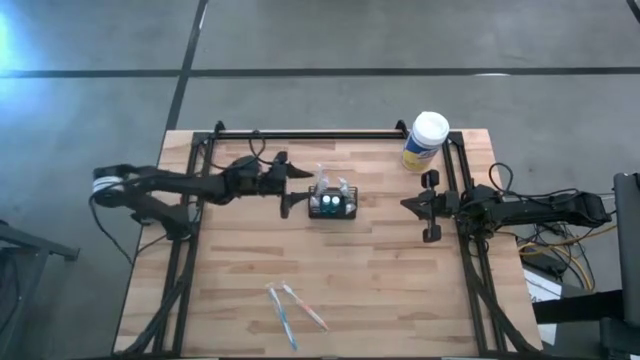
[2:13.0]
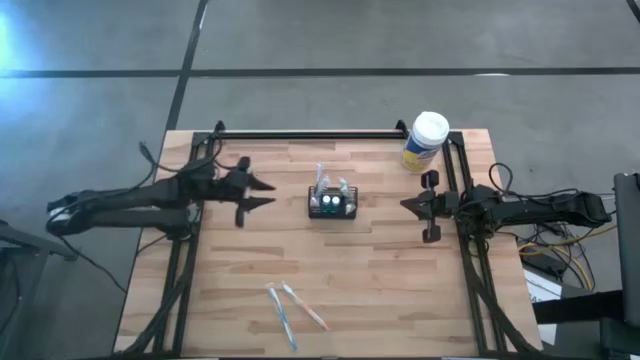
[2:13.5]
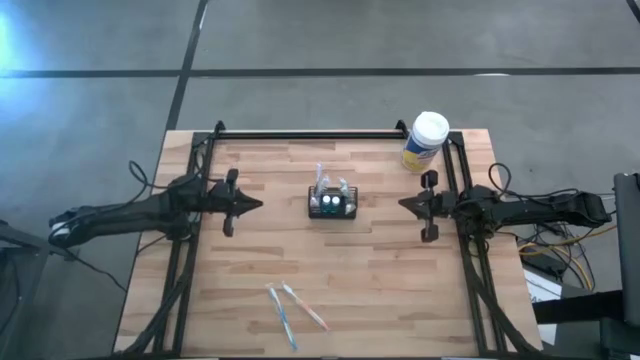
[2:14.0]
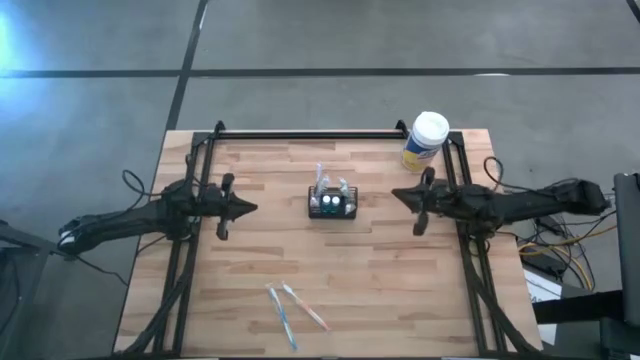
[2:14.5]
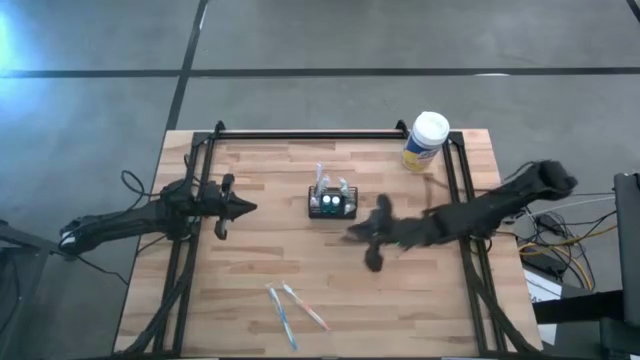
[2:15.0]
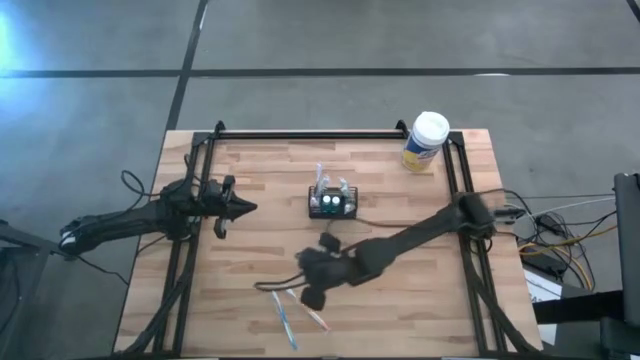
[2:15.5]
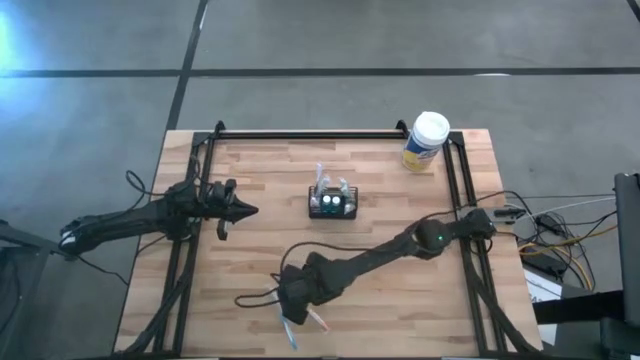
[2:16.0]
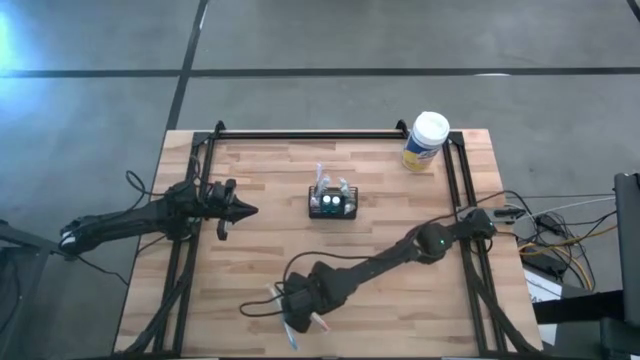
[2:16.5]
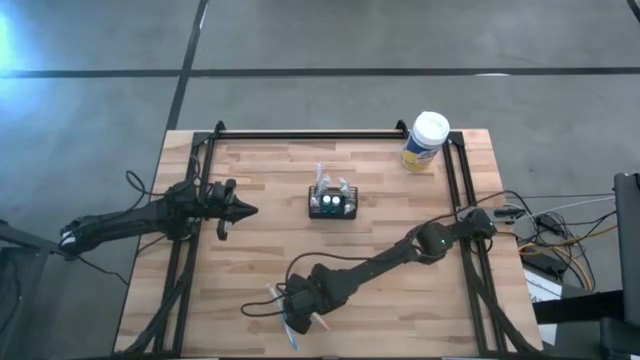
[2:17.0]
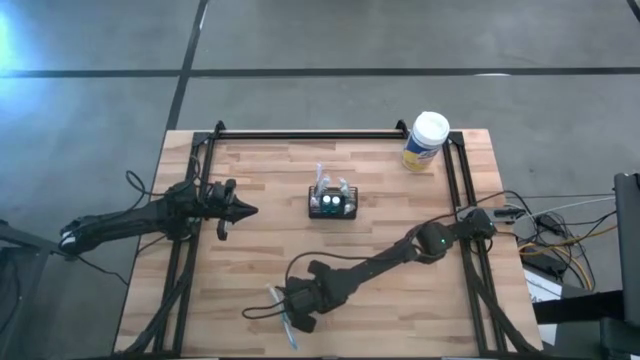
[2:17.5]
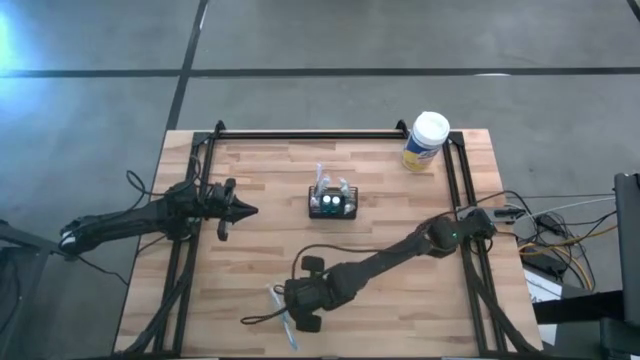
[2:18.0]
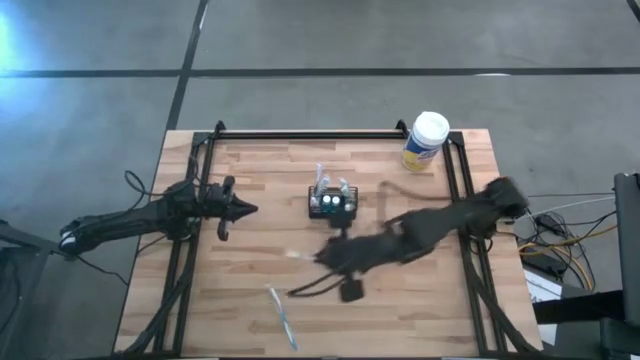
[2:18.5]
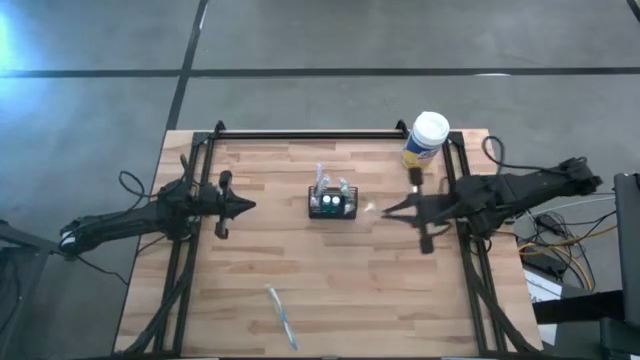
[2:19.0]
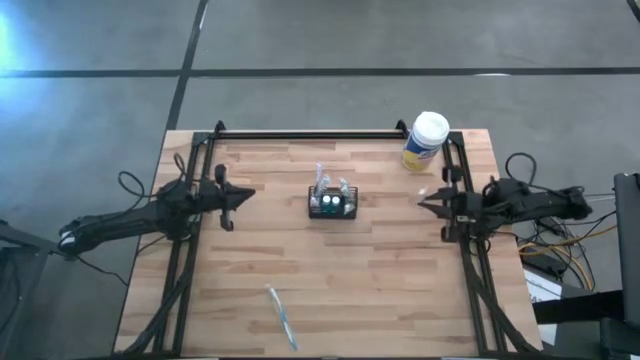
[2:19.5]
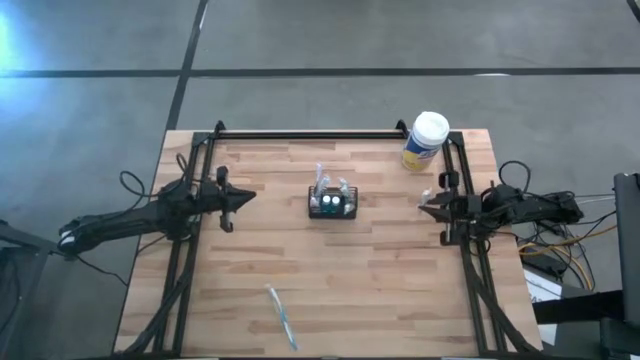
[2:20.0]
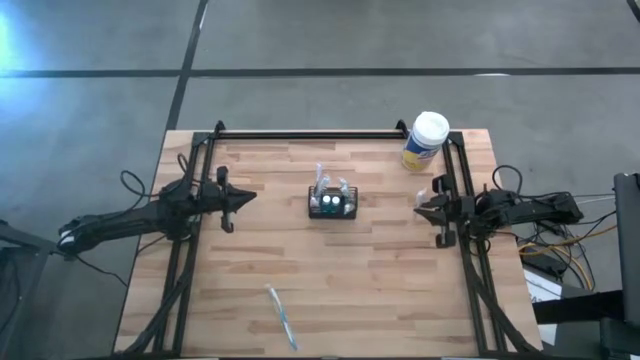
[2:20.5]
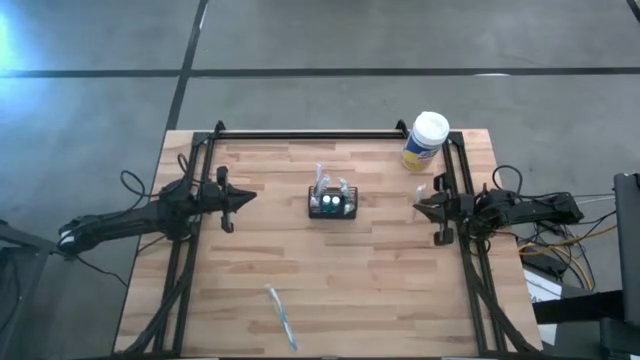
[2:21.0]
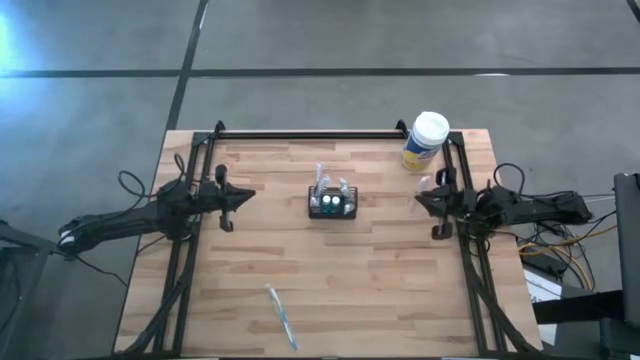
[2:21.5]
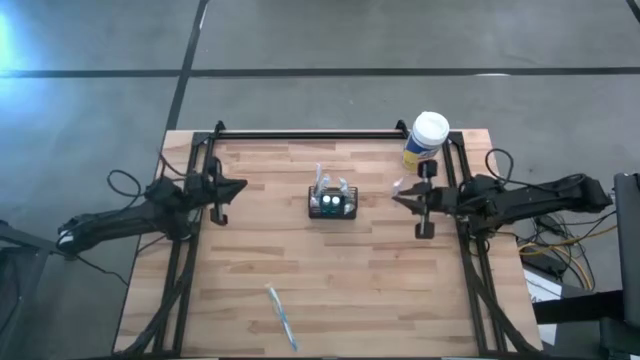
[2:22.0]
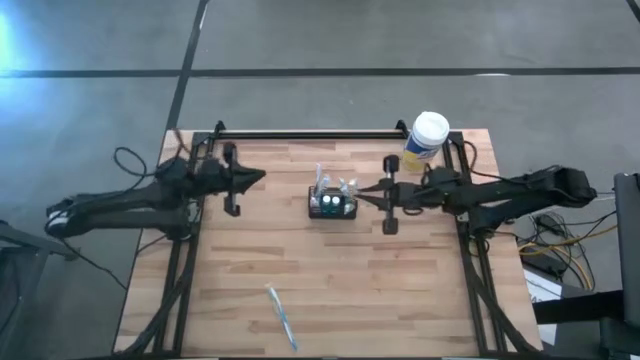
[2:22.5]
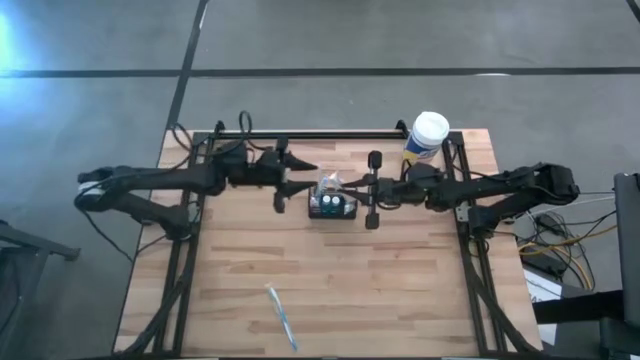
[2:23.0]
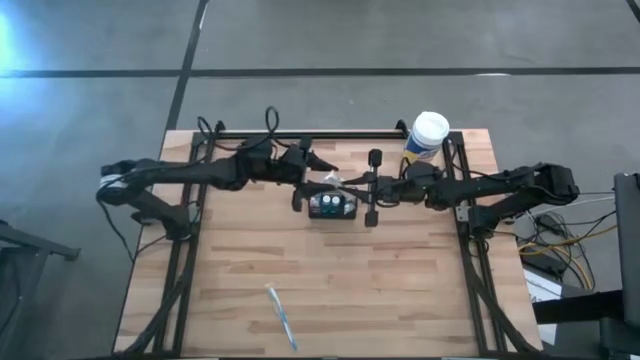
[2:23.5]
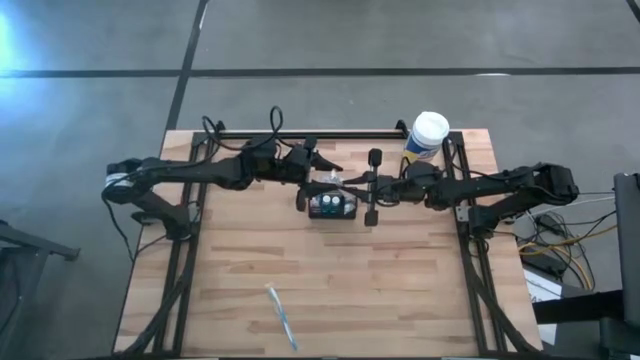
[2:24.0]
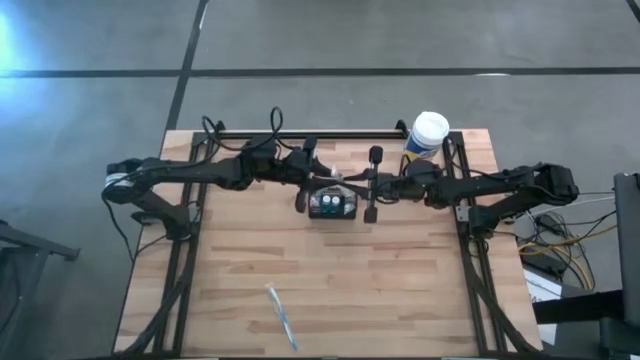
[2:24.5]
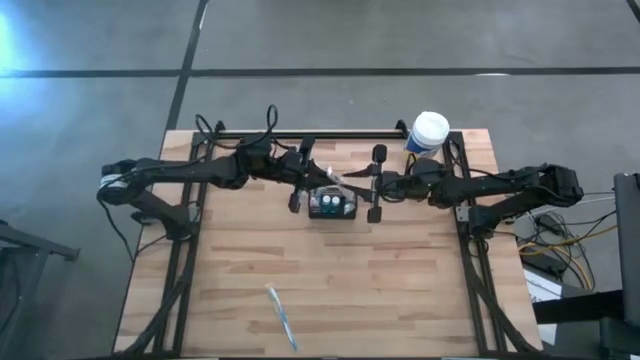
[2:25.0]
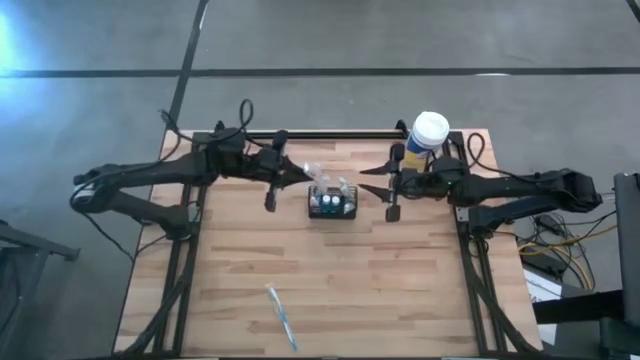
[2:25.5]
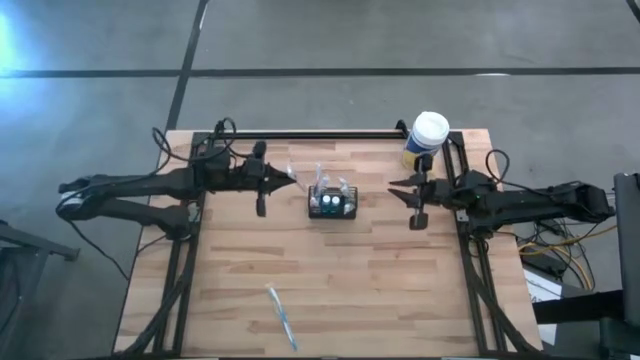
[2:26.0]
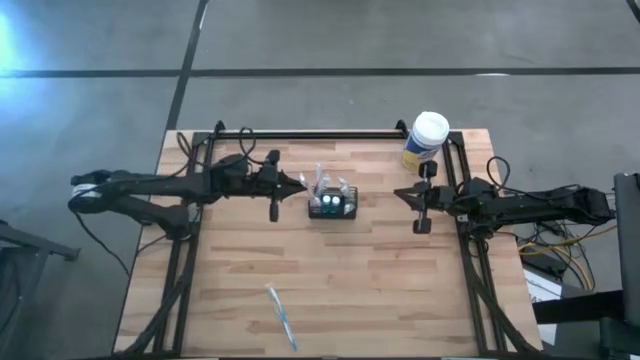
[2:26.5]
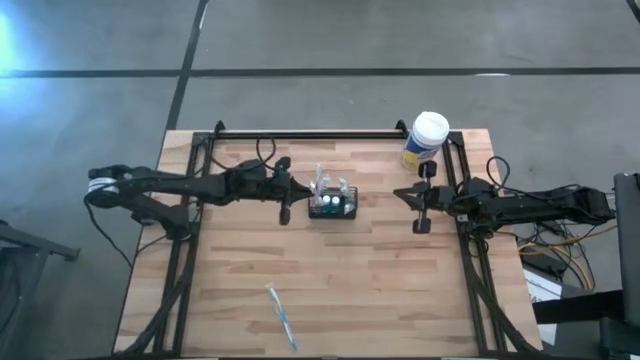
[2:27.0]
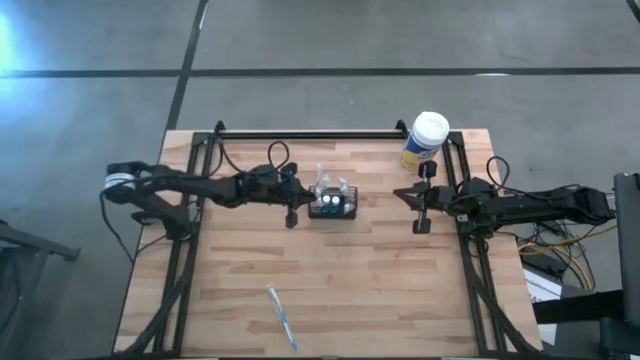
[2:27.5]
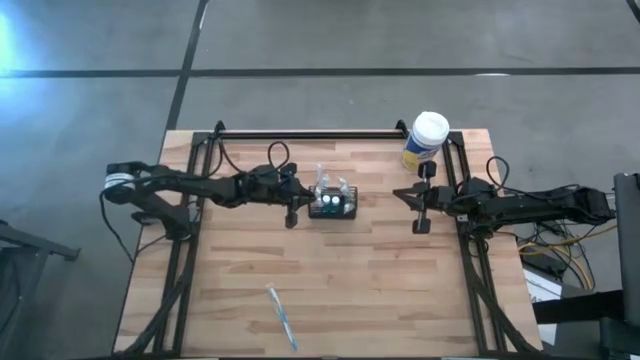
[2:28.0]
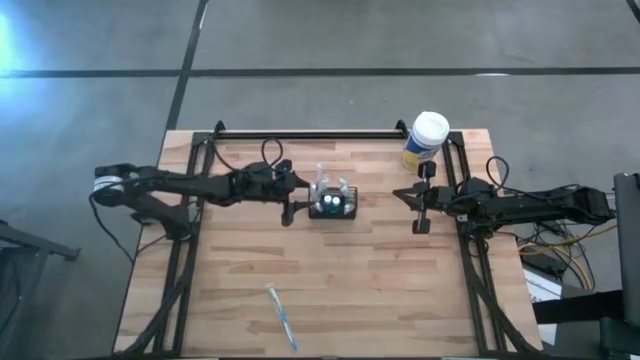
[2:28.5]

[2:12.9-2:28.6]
Task: Pick & Place toothbrushing station
Put the orange toothbrush into the black organizer

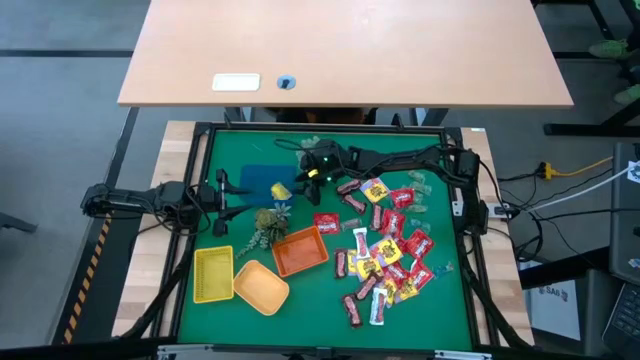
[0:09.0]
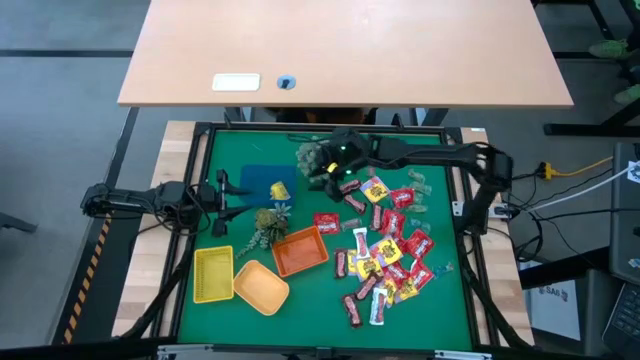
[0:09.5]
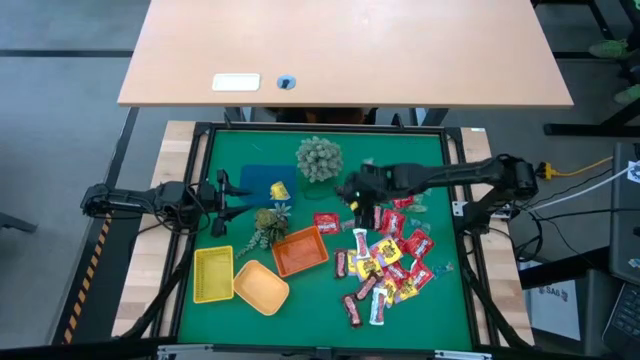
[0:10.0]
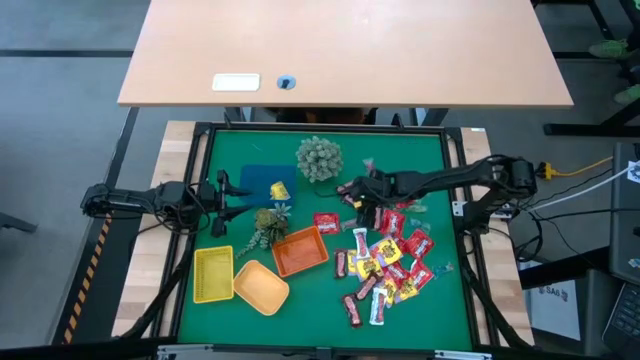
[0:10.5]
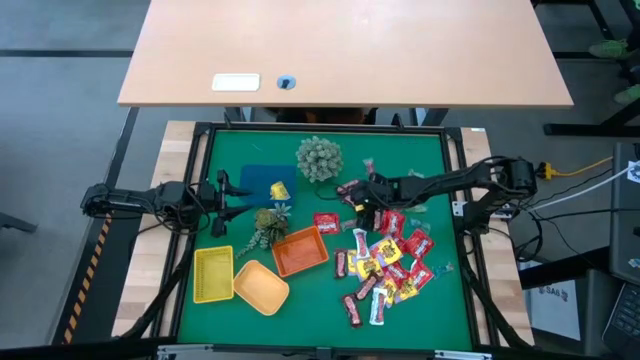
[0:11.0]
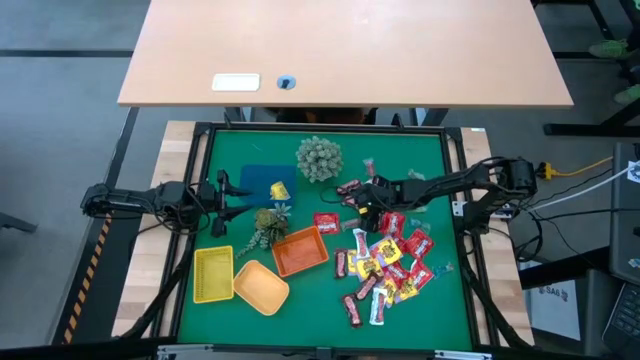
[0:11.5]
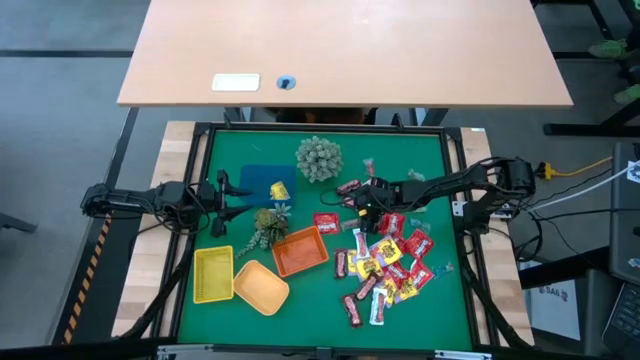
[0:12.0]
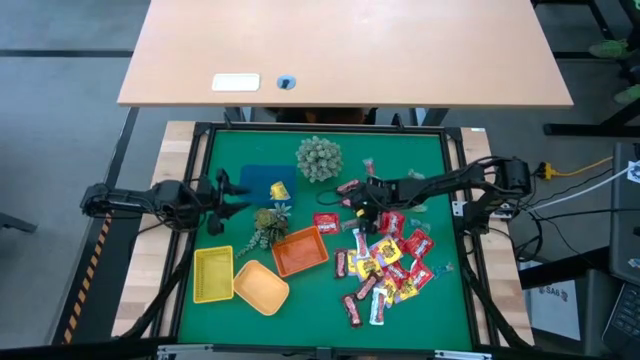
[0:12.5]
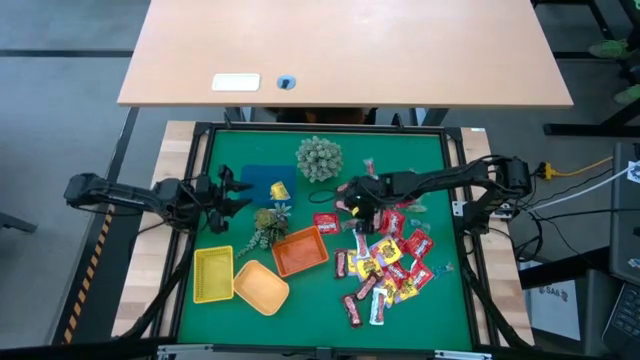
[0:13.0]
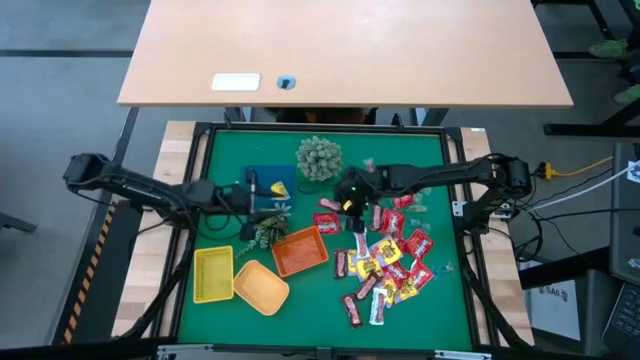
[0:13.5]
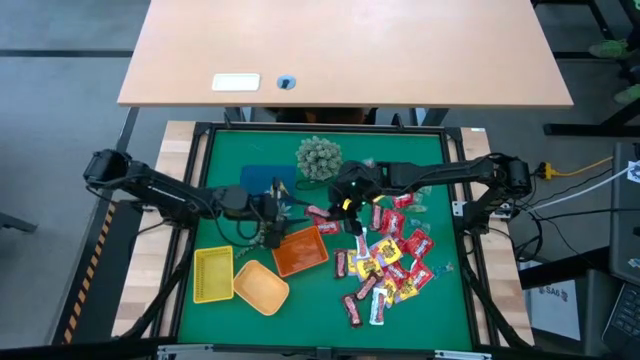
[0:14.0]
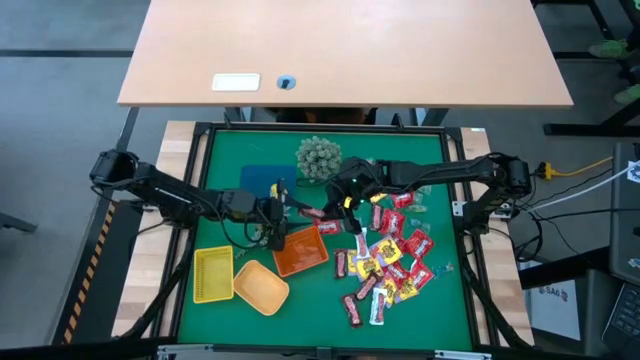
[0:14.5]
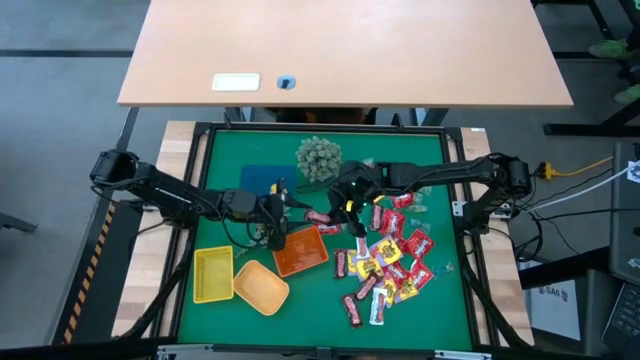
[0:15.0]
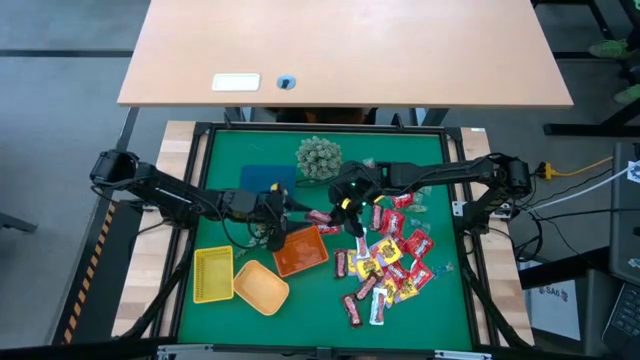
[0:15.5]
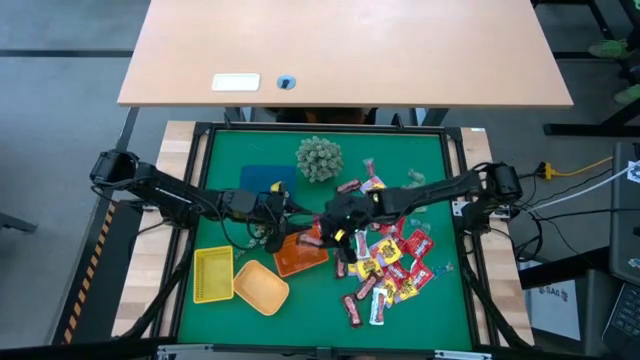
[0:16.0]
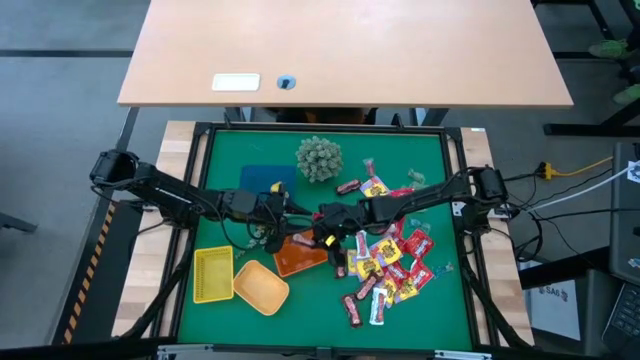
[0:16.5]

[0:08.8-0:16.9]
Task: Sort candy
Put the brown chocolate into the orange bin
